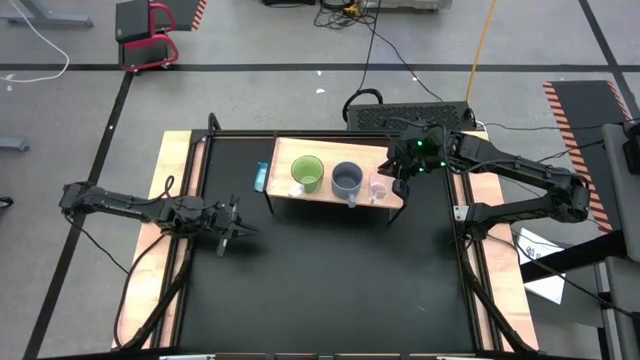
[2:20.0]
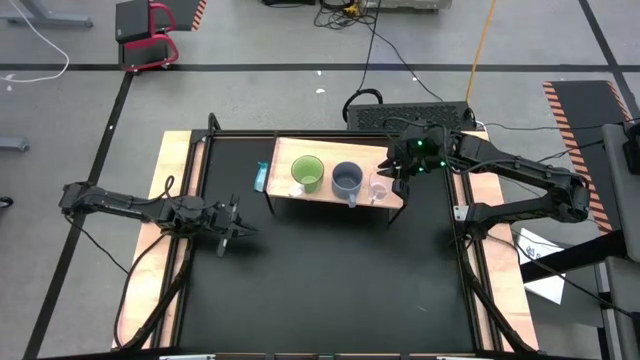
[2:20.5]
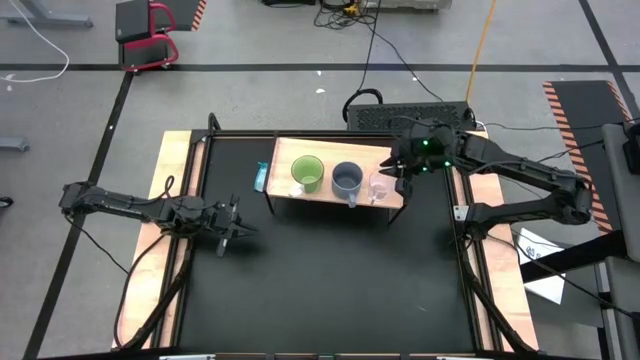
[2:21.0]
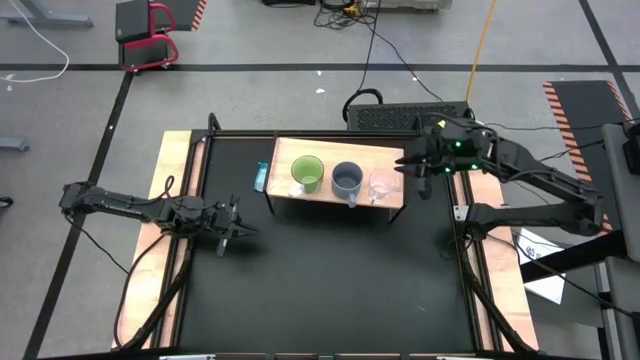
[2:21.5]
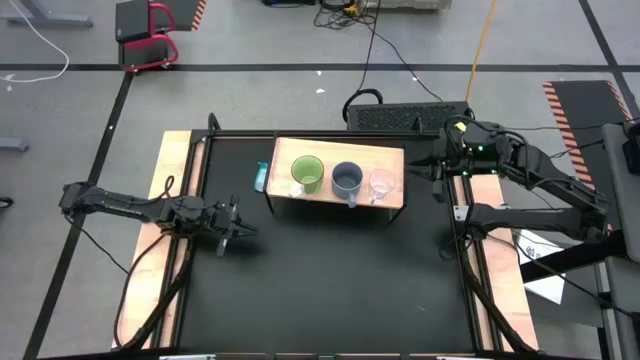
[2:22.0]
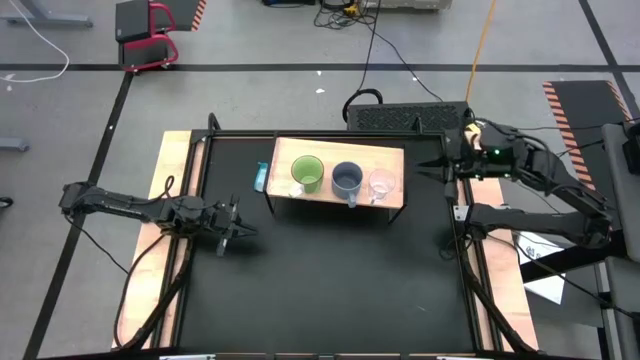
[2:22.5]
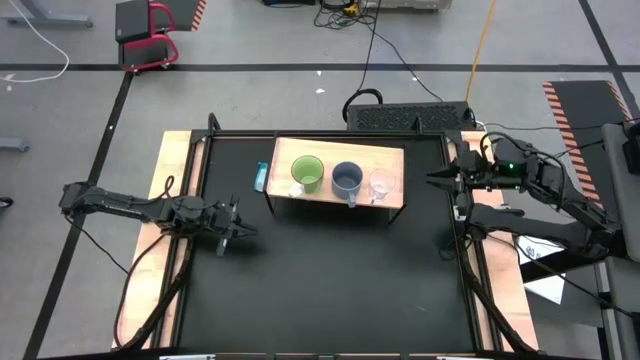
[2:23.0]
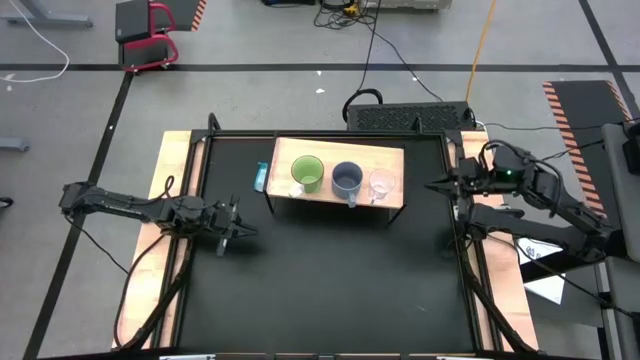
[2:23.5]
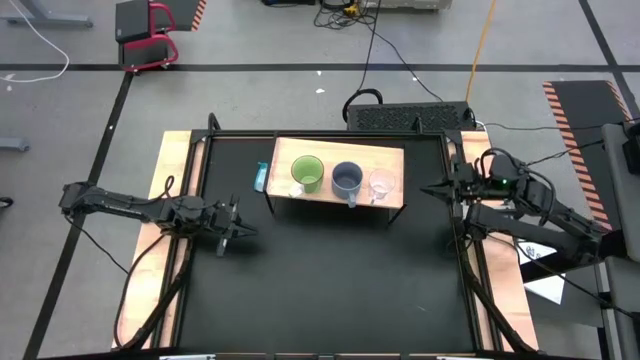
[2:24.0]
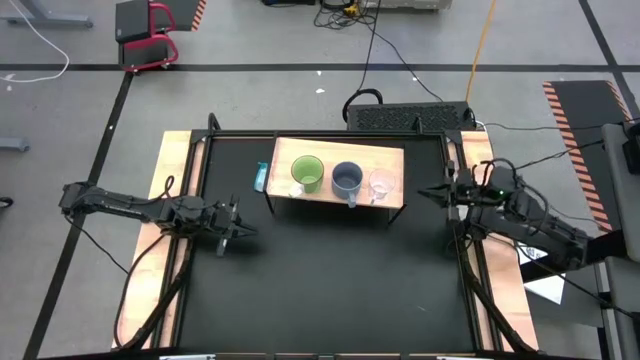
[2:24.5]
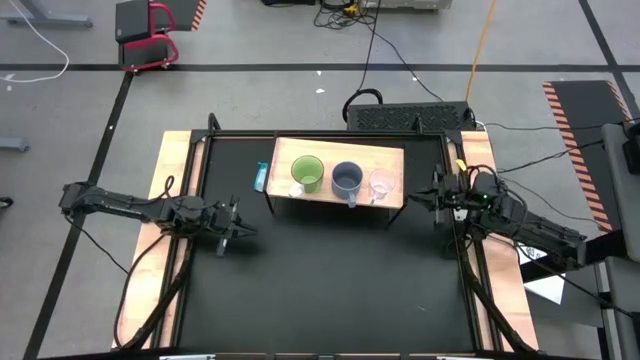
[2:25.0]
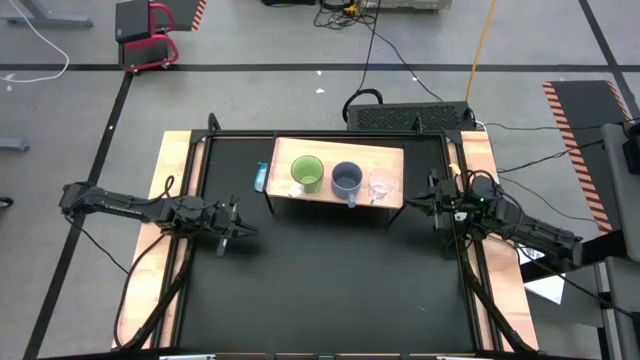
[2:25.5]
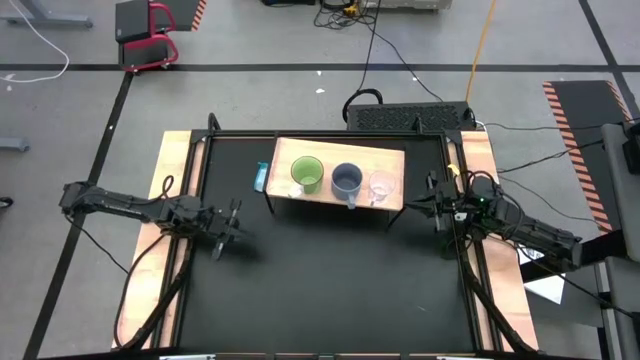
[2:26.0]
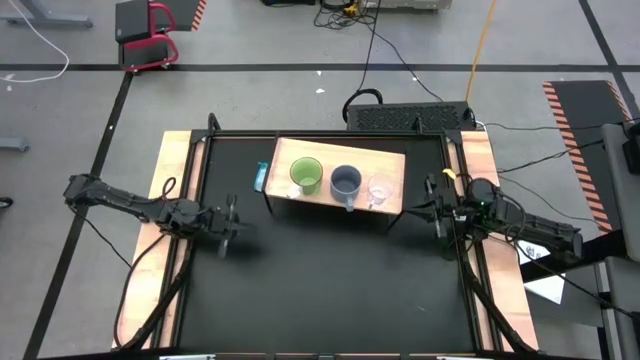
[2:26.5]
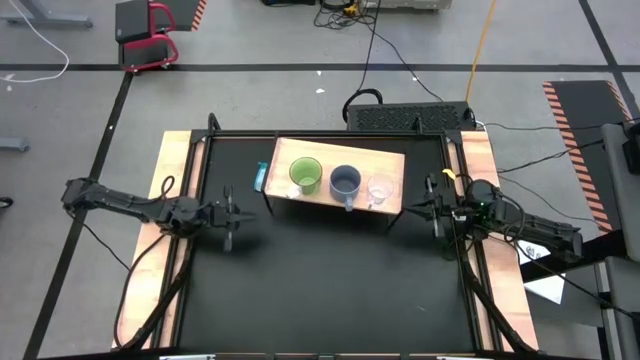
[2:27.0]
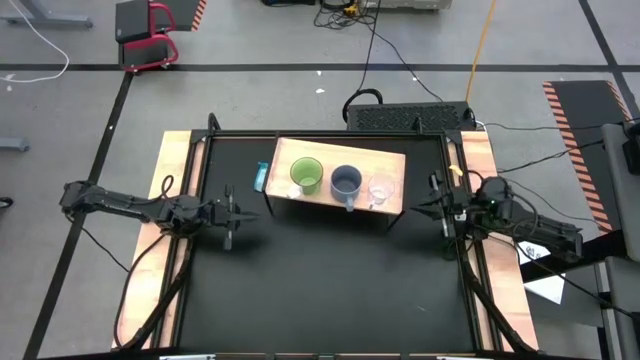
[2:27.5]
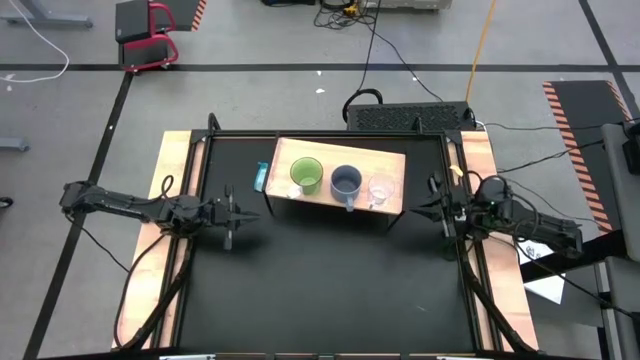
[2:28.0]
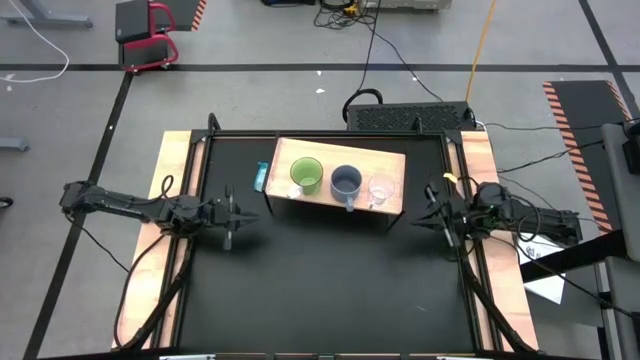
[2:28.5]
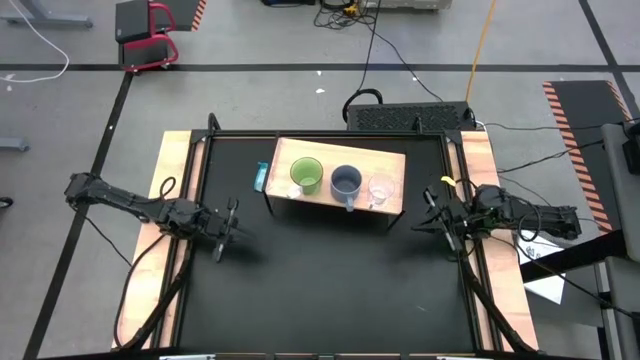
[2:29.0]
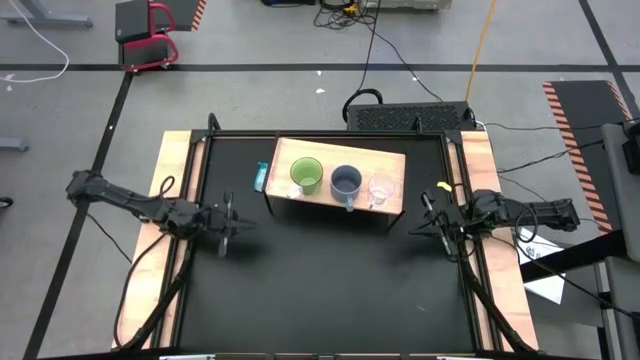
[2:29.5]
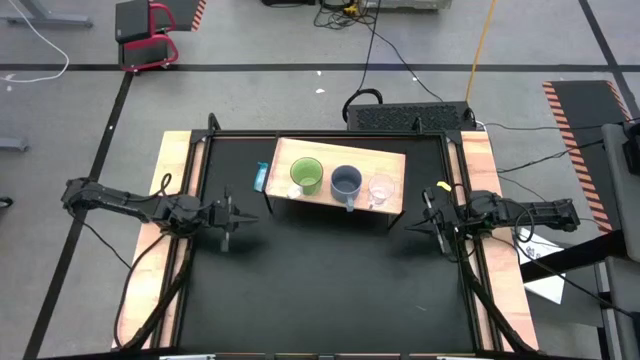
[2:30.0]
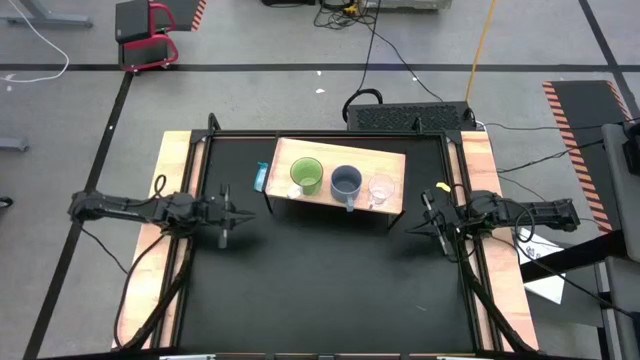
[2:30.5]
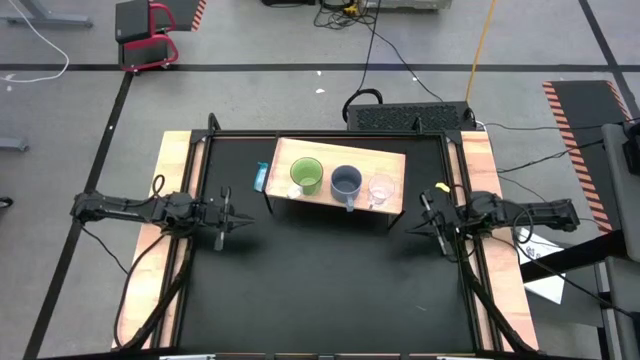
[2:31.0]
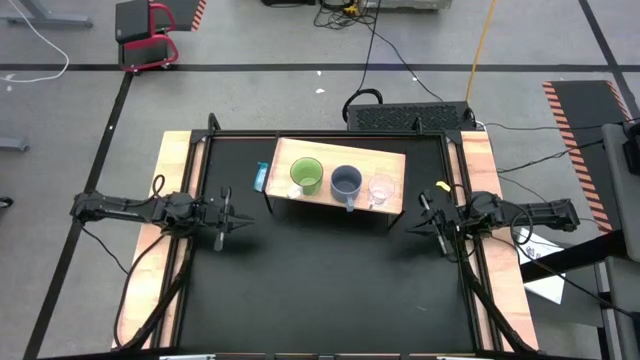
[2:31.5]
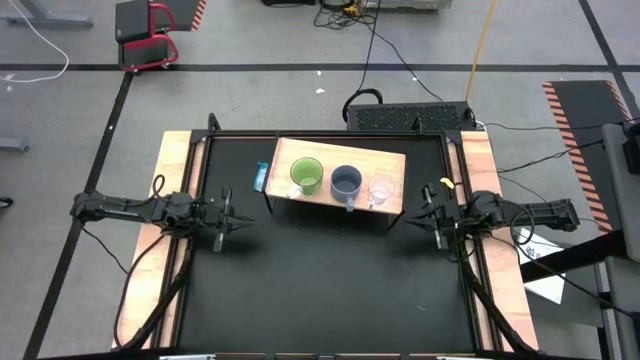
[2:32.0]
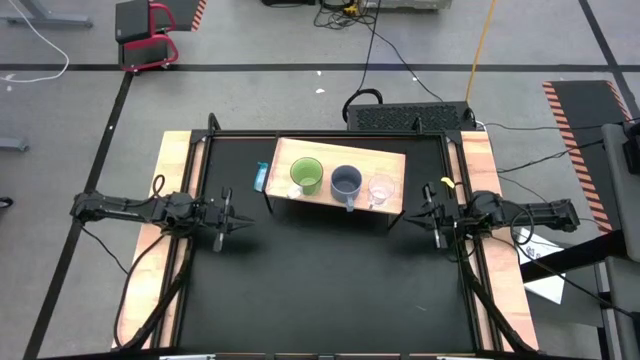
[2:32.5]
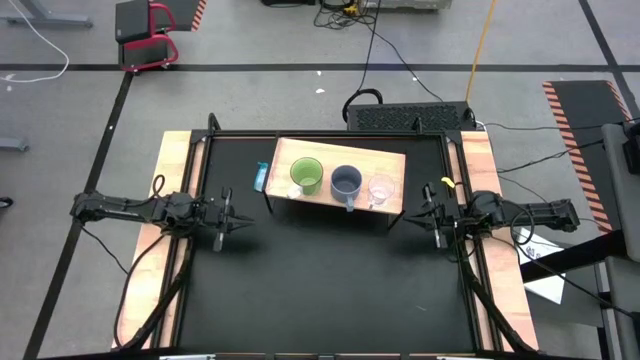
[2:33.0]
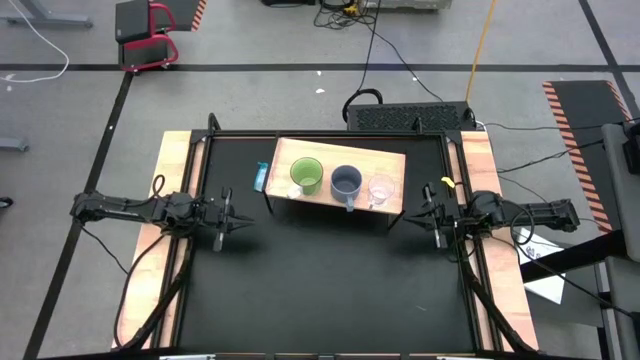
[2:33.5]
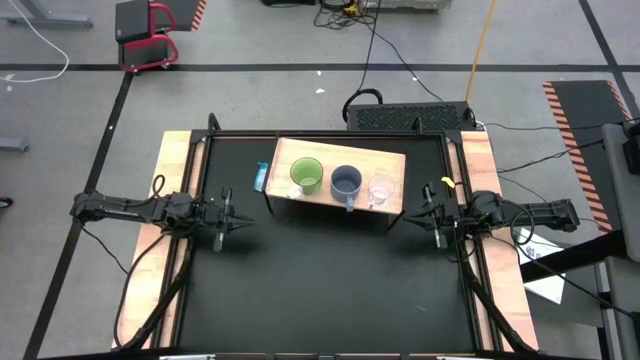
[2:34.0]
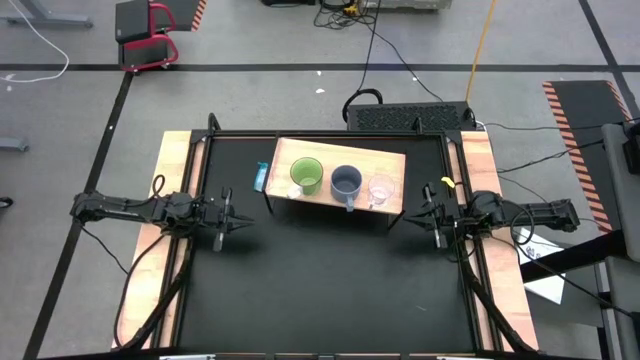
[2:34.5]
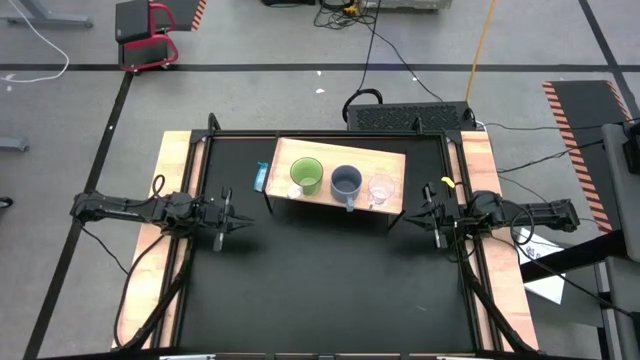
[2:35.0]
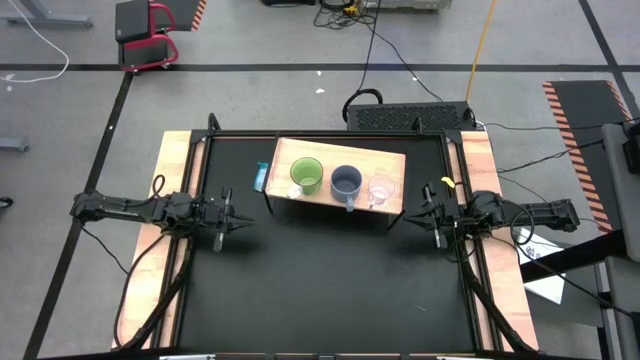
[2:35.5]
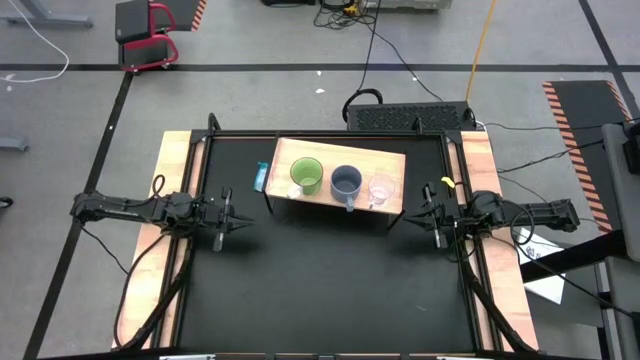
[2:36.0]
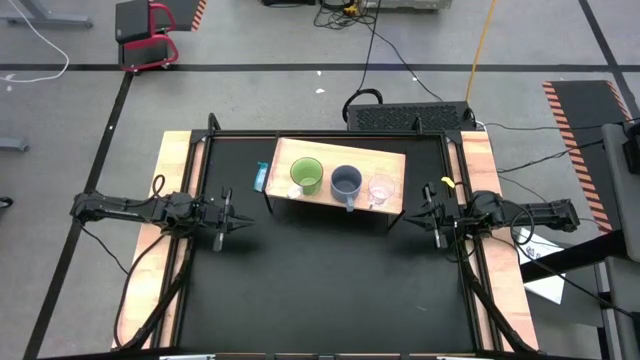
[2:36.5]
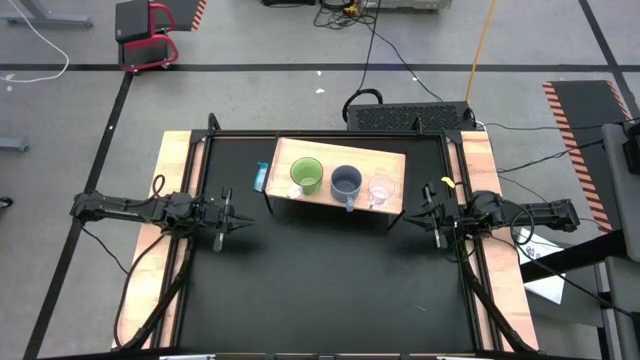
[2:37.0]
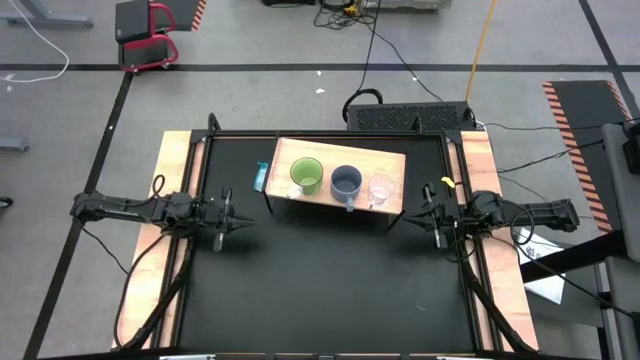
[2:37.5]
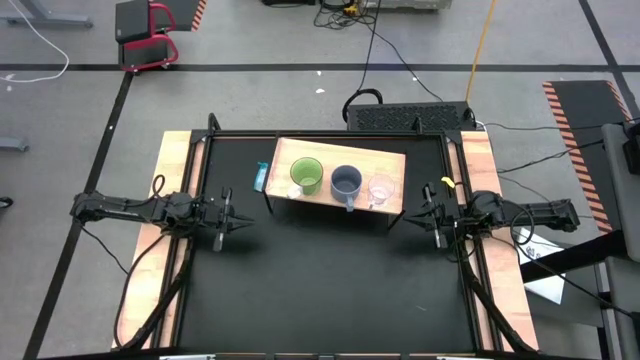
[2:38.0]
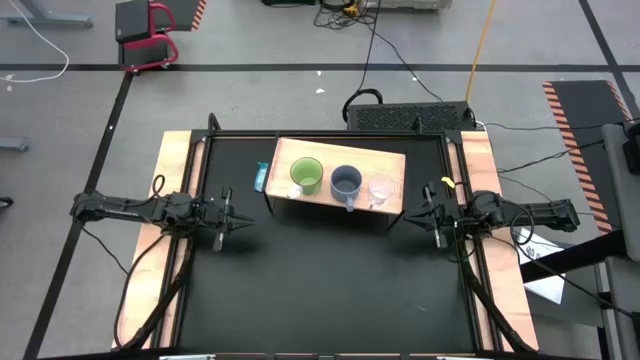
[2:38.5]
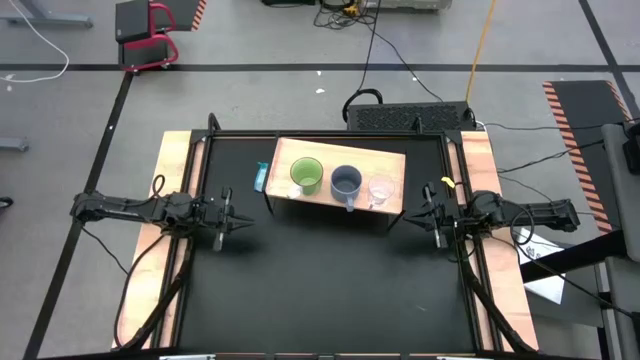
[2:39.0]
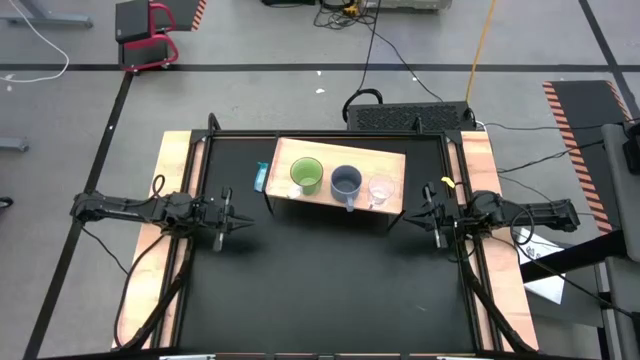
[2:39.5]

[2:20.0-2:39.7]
Task: Stack small to large cups/mugs on shelf
Return to Home Position
